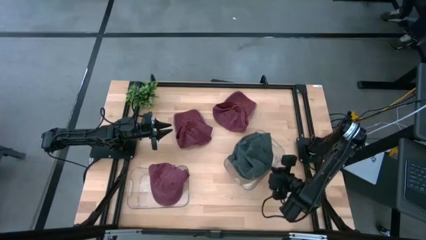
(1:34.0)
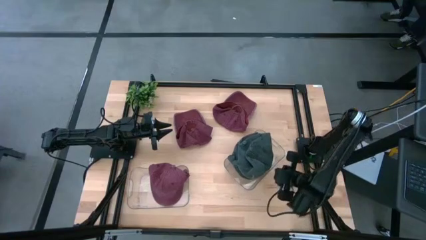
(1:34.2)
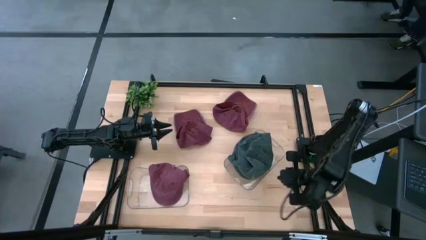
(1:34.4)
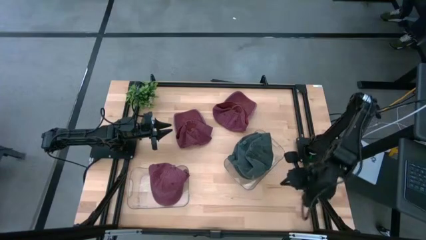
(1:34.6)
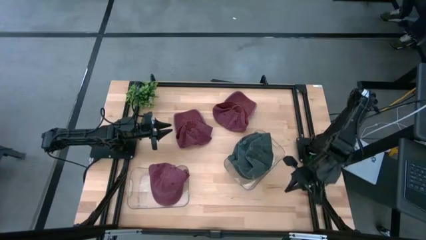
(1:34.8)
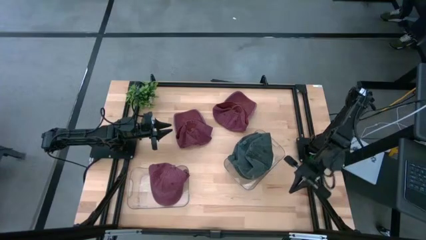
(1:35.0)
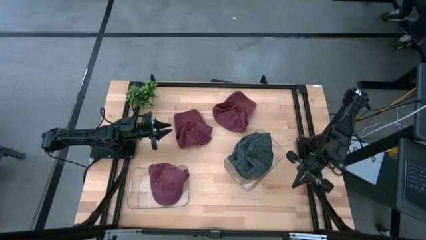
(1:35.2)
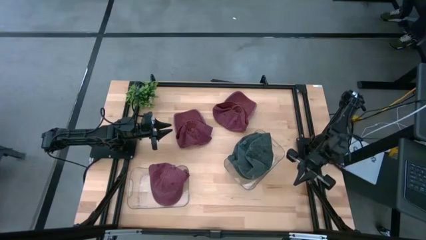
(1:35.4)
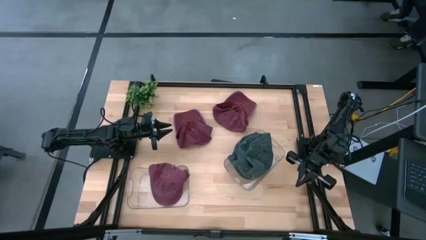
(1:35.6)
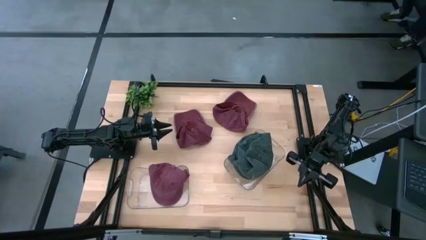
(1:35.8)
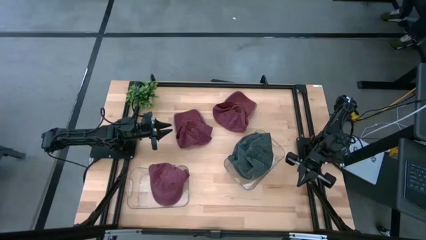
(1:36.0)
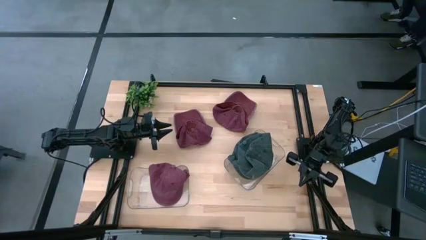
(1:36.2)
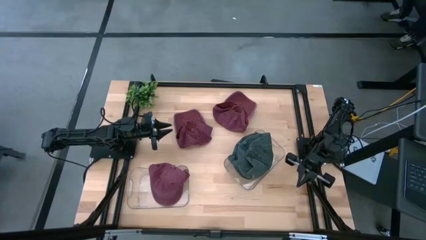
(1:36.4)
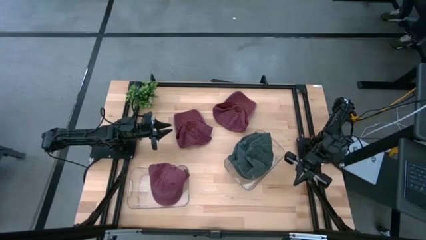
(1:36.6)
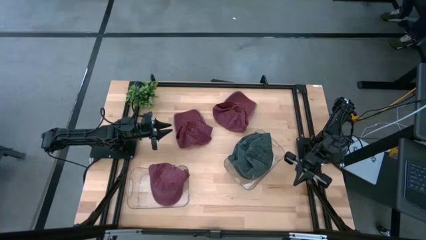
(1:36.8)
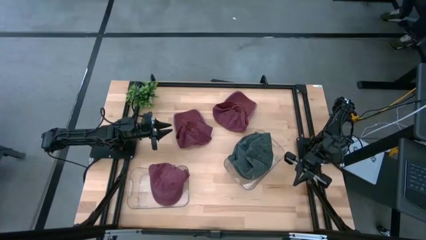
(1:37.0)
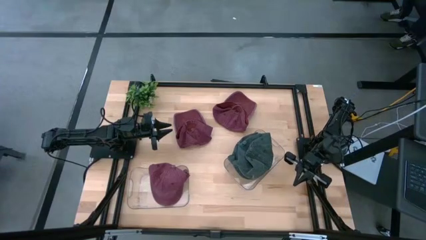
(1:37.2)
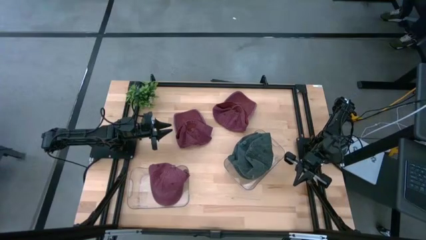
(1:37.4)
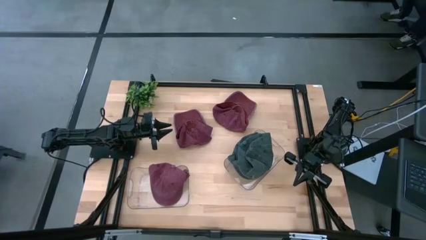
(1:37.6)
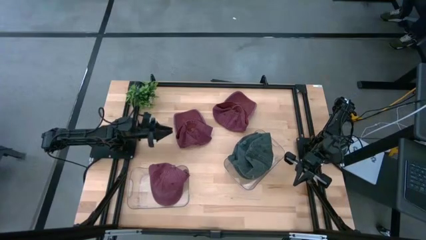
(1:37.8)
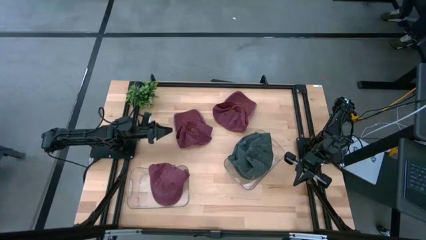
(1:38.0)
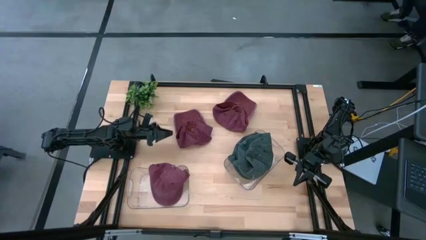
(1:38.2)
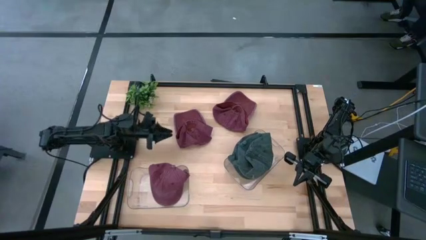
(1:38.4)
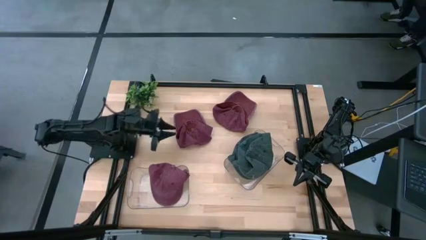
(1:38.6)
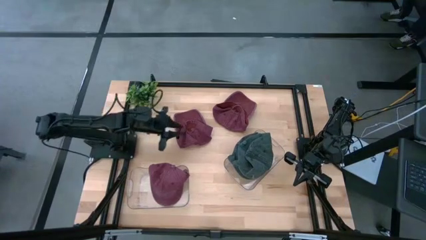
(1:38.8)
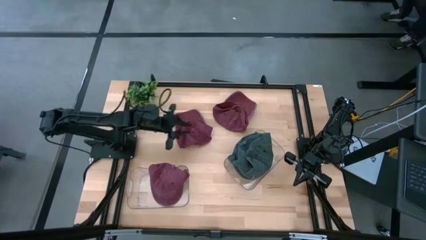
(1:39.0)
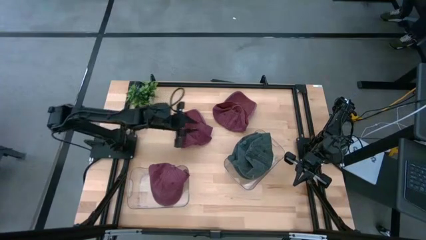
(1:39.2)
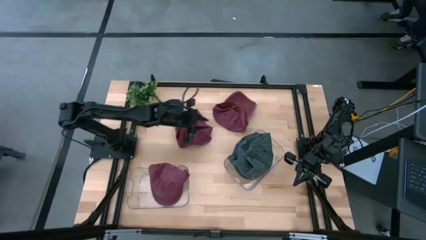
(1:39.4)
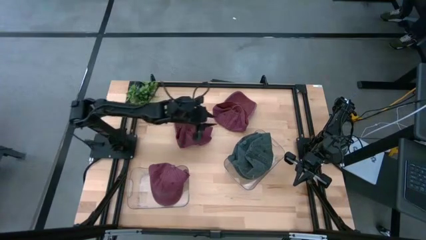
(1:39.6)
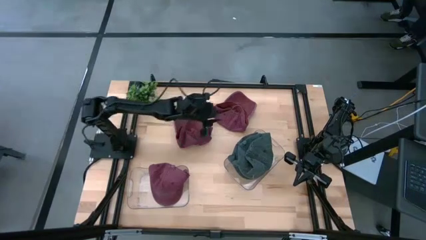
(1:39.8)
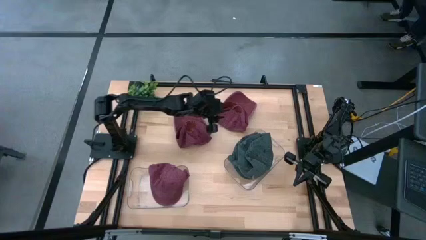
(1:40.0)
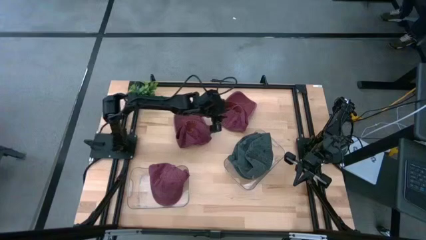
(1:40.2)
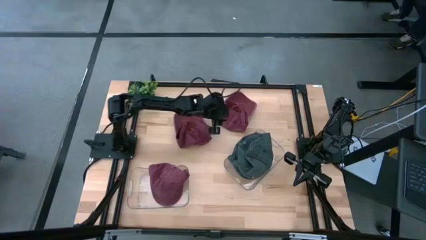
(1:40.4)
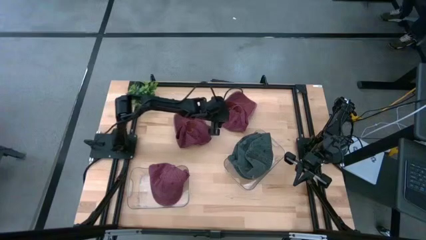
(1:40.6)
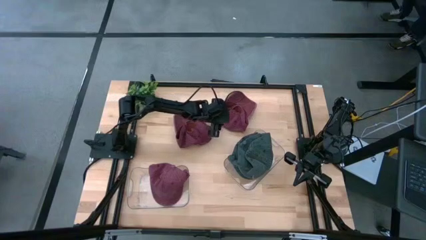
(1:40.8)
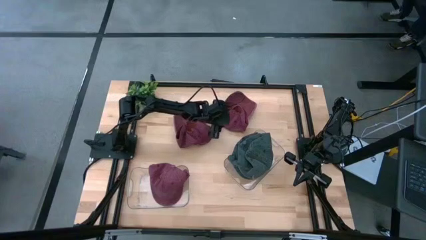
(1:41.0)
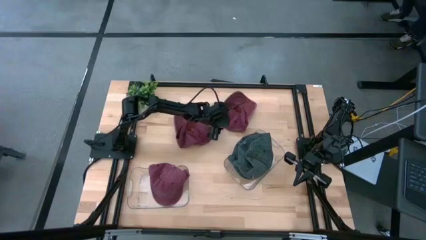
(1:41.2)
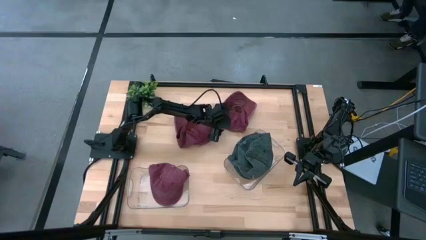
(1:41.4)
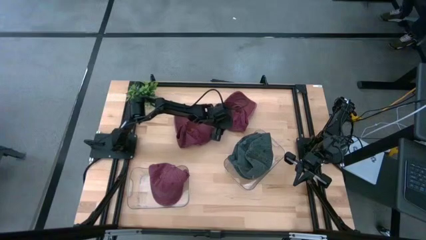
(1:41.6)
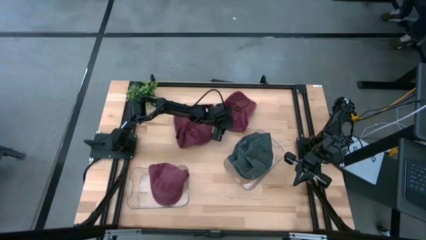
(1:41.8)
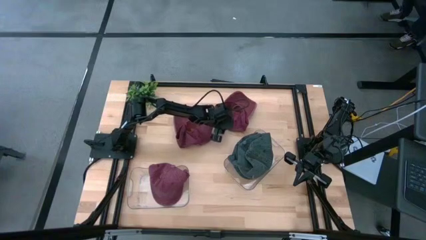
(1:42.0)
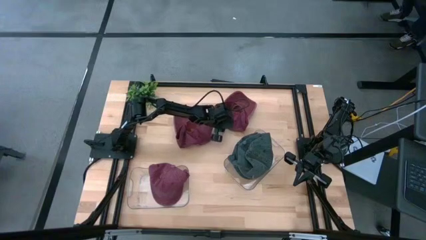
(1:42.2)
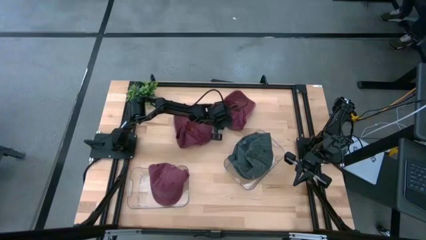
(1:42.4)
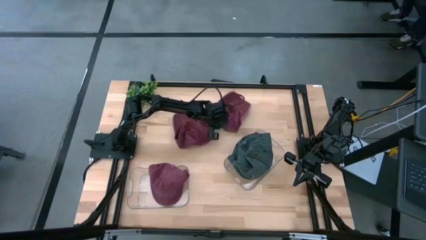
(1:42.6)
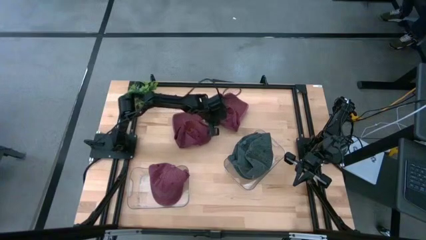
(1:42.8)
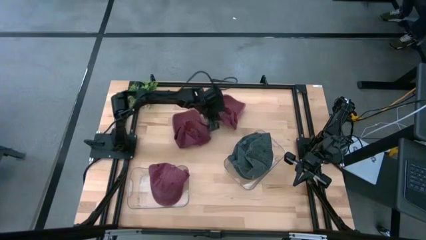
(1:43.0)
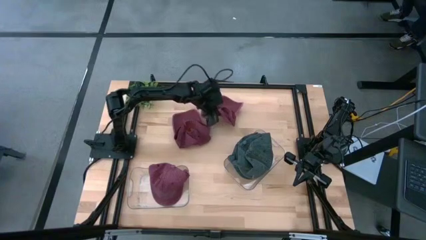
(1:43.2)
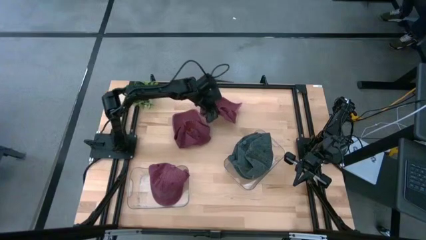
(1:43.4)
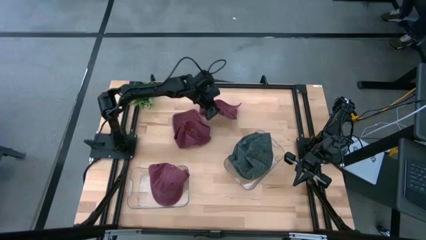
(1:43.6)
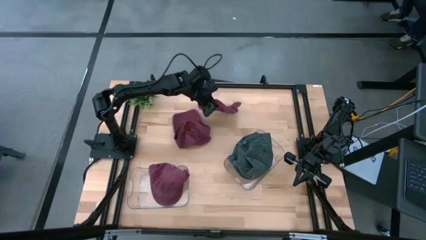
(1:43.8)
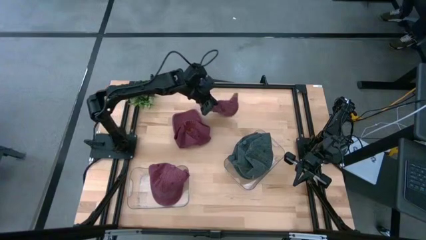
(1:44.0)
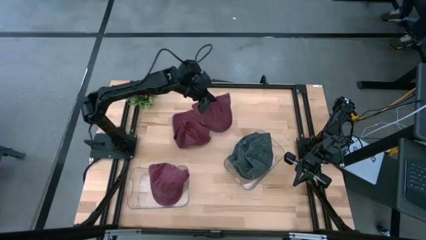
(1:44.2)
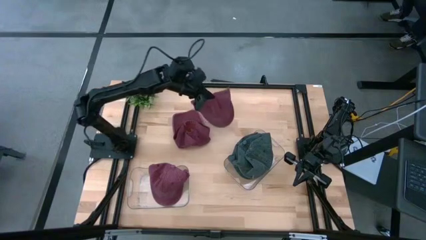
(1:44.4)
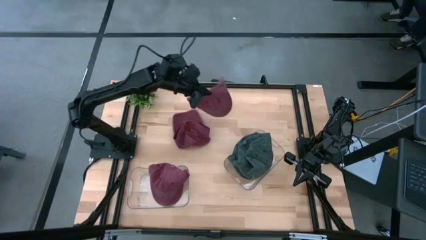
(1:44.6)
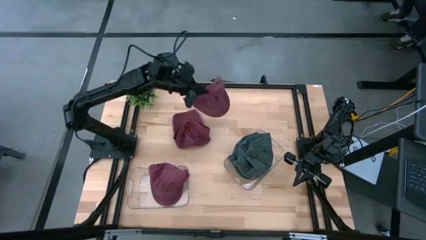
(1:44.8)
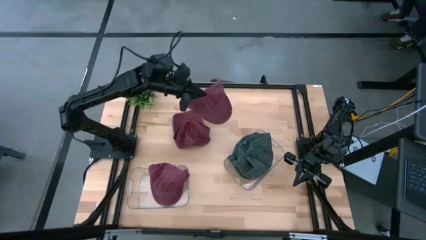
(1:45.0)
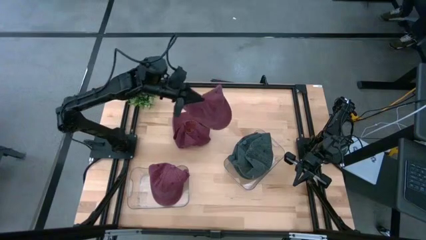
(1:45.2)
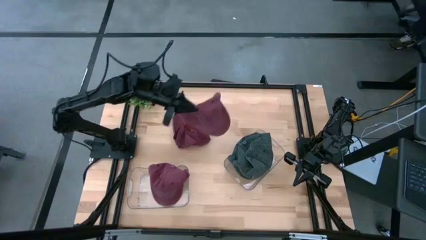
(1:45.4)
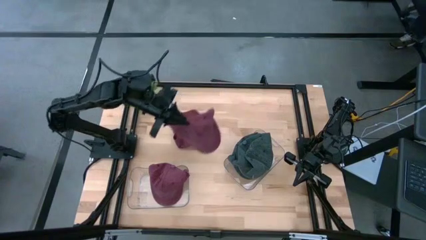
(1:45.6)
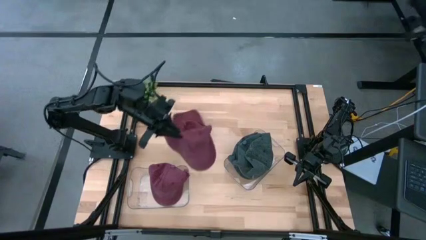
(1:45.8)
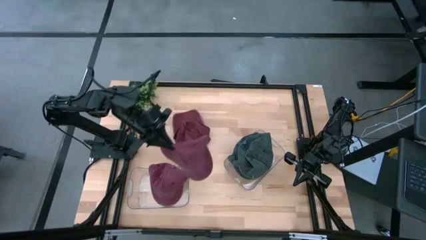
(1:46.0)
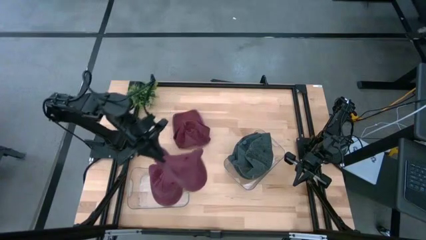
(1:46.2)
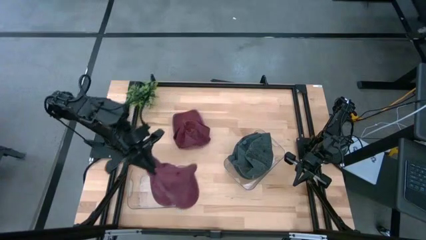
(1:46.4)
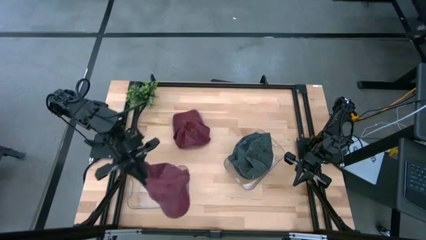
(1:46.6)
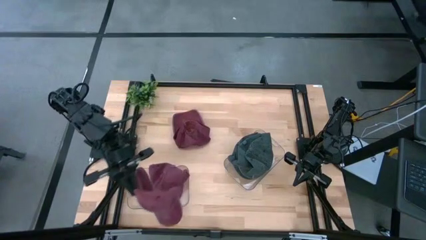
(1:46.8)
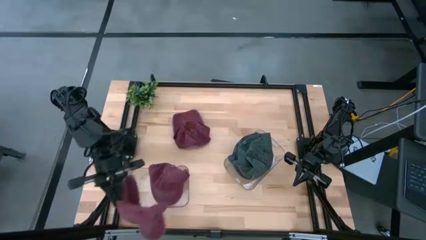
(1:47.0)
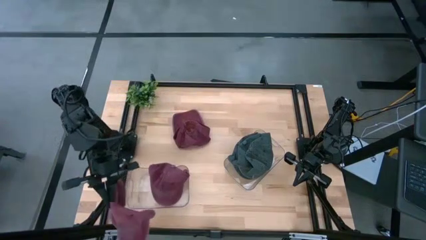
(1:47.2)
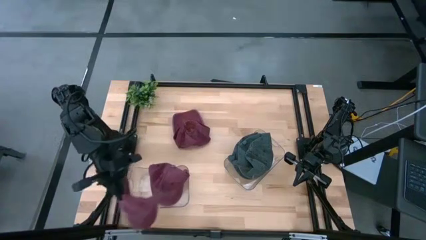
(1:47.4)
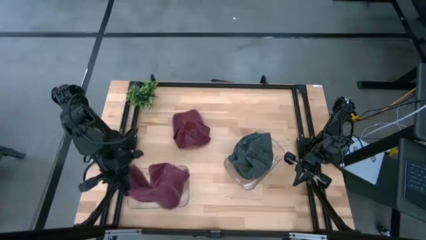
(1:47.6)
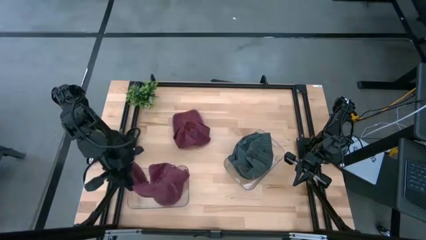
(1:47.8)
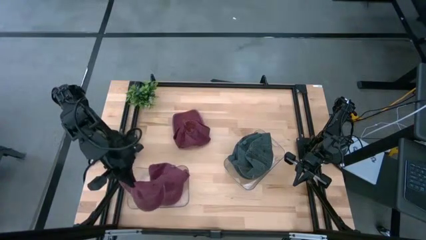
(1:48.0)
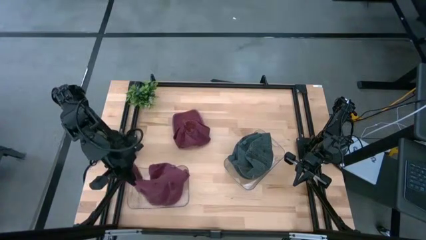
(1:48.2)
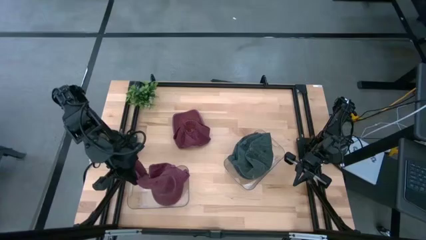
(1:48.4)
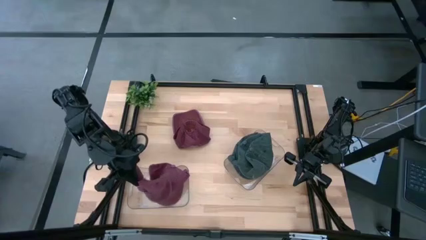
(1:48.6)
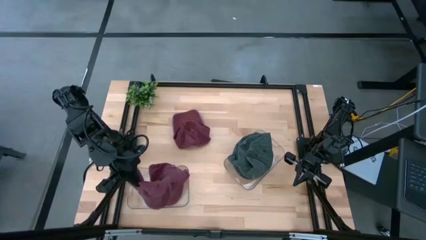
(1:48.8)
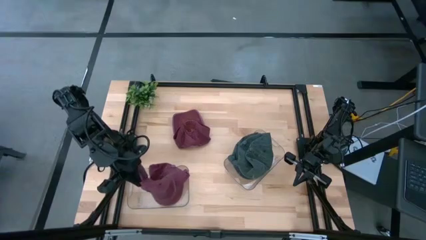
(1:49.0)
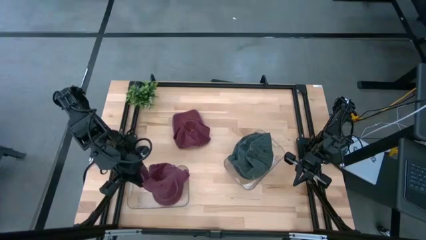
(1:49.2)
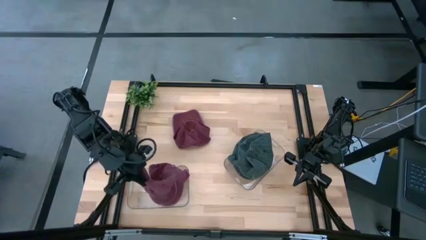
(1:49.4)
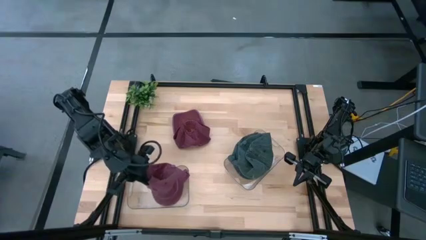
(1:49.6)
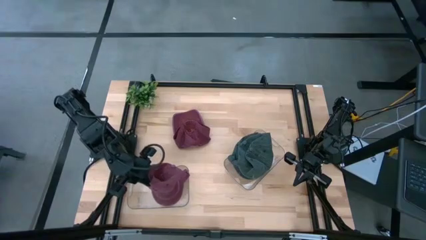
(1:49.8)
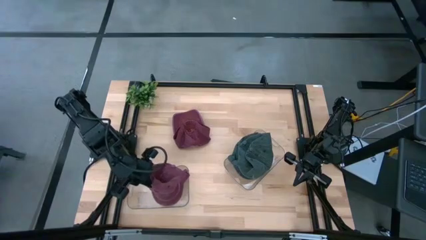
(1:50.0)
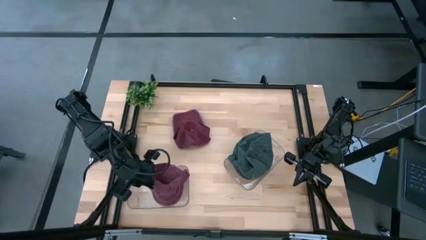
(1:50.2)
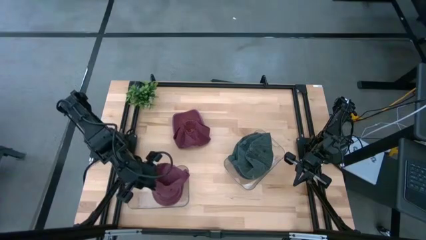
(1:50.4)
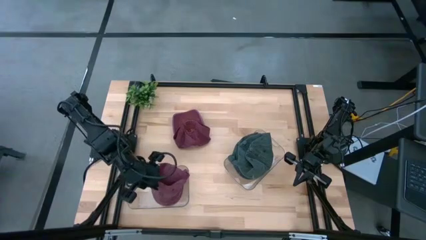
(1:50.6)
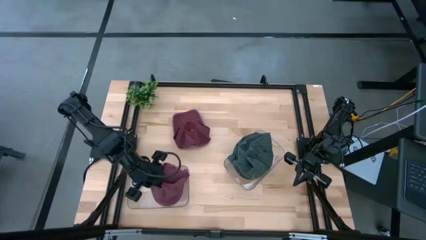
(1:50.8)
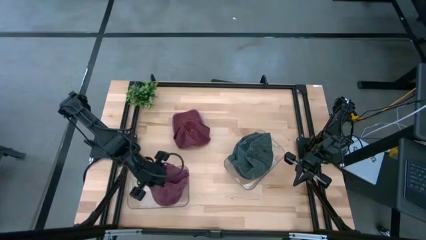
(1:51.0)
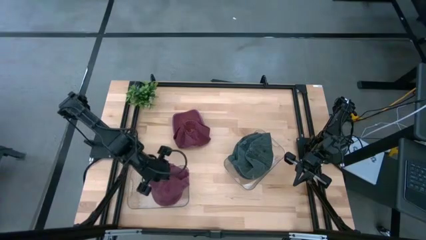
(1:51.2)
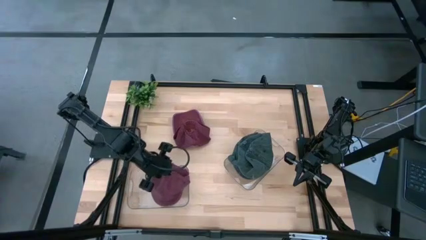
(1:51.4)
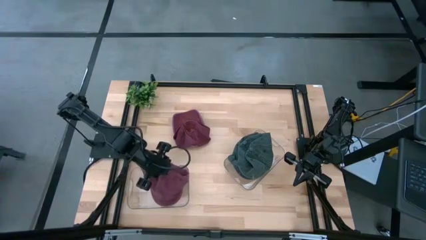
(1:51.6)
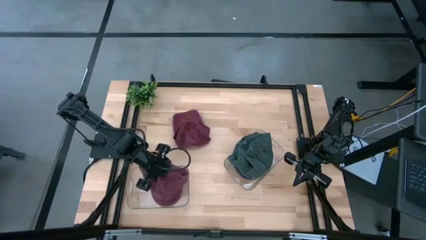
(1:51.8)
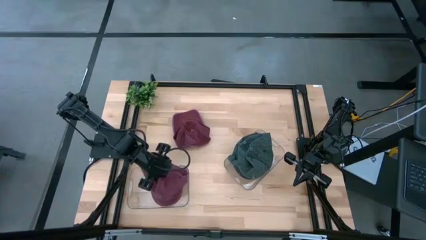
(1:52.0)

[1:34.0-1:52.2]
Task: Pick & Place hat
Put the top red cap into the left transparent bin
